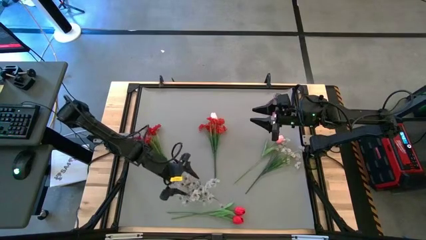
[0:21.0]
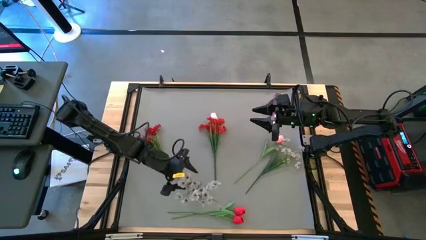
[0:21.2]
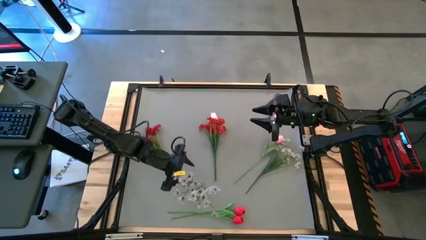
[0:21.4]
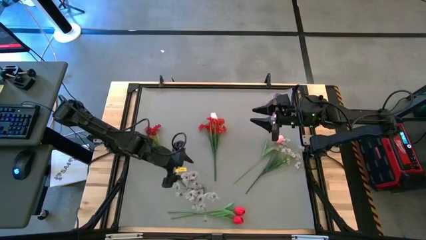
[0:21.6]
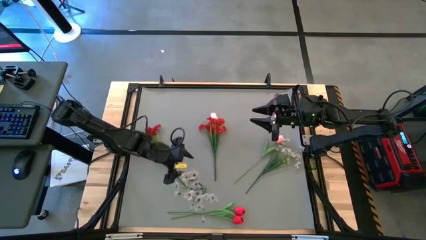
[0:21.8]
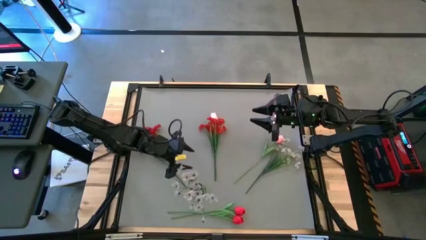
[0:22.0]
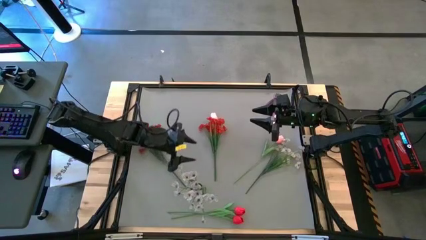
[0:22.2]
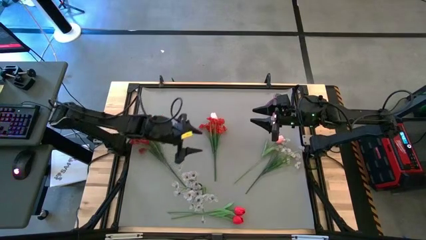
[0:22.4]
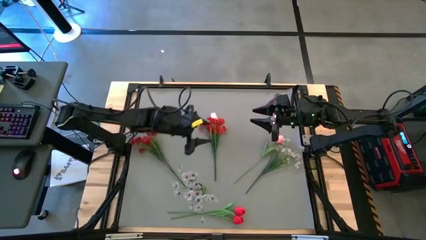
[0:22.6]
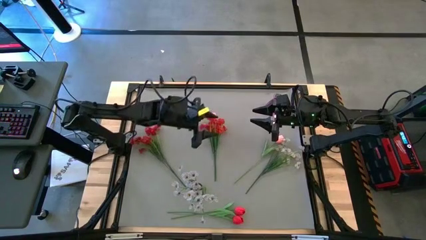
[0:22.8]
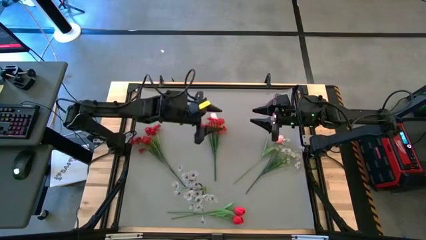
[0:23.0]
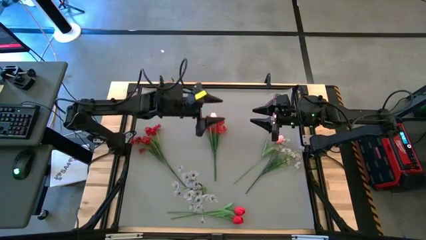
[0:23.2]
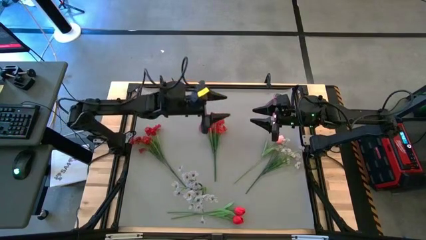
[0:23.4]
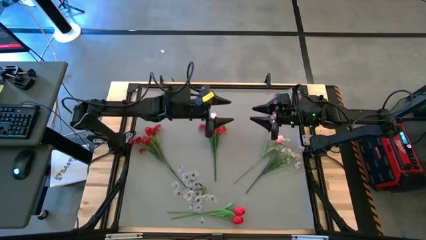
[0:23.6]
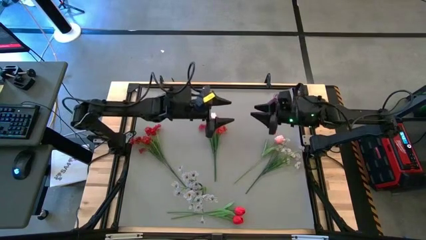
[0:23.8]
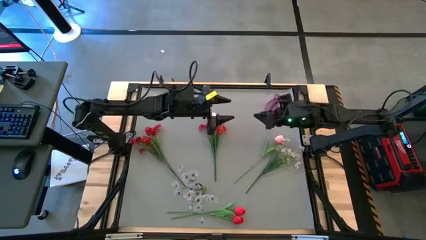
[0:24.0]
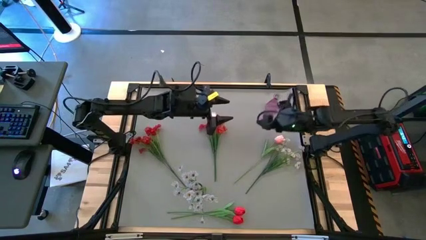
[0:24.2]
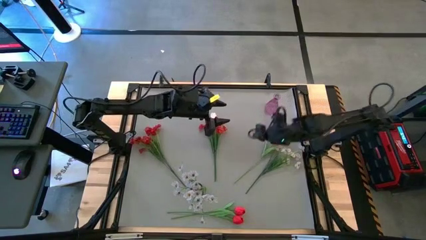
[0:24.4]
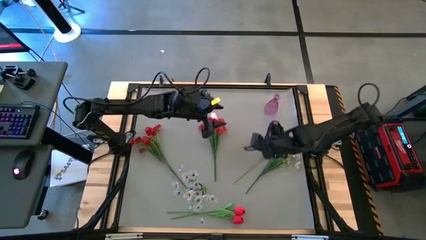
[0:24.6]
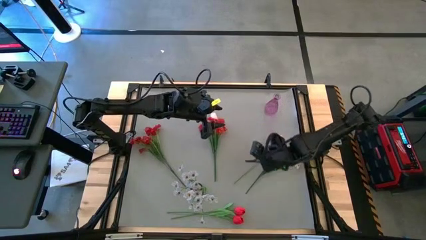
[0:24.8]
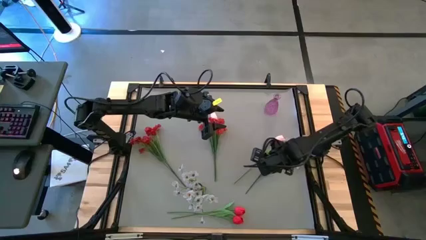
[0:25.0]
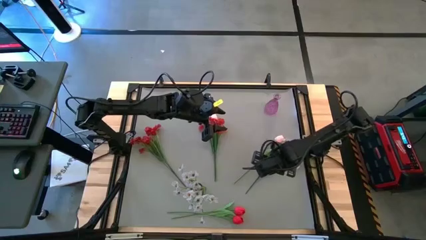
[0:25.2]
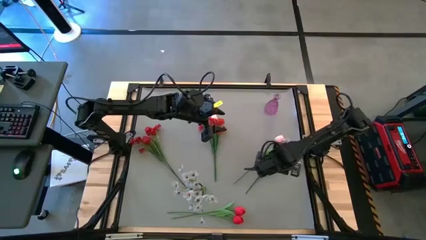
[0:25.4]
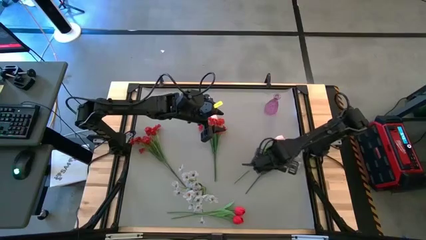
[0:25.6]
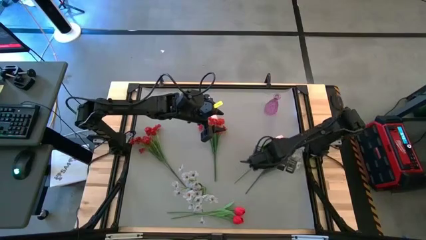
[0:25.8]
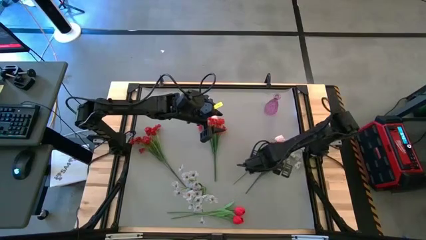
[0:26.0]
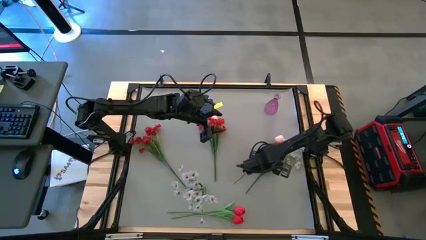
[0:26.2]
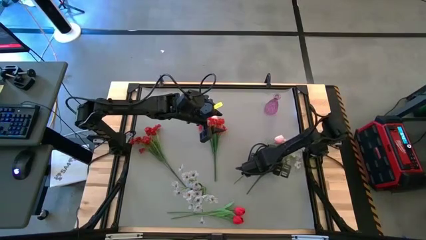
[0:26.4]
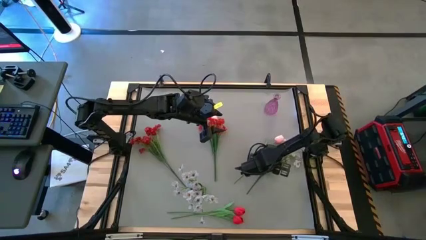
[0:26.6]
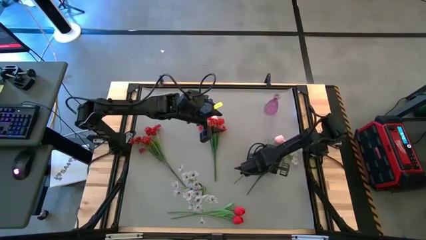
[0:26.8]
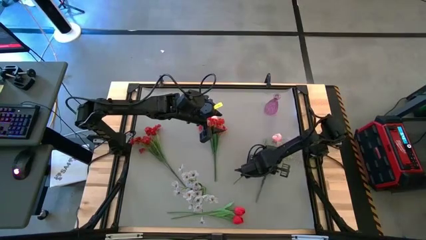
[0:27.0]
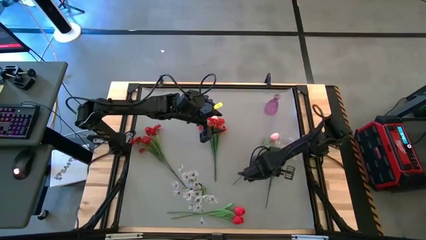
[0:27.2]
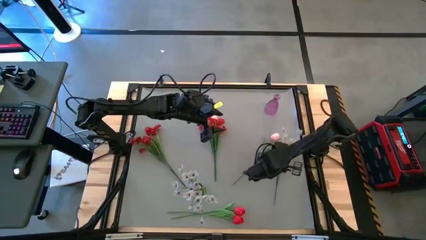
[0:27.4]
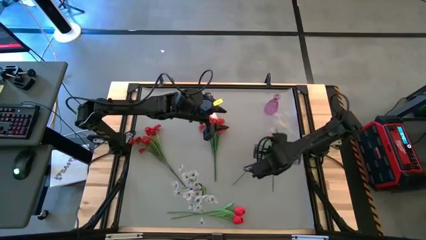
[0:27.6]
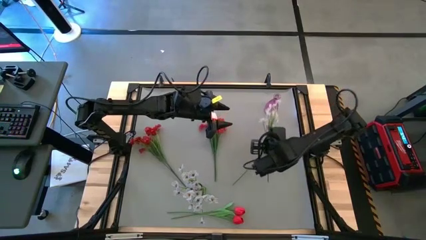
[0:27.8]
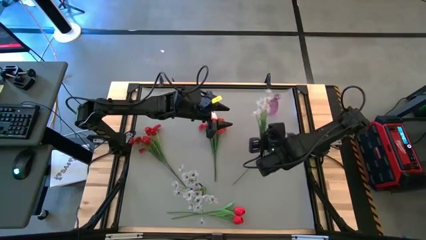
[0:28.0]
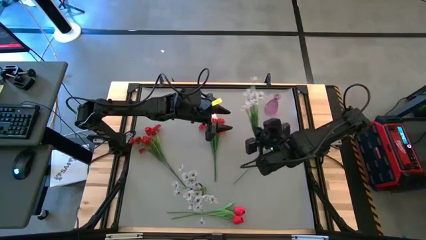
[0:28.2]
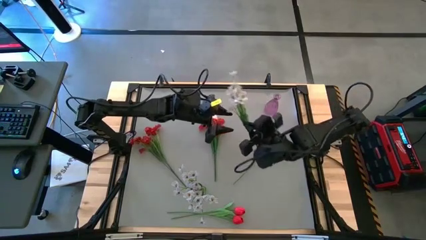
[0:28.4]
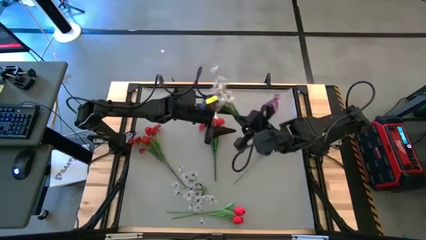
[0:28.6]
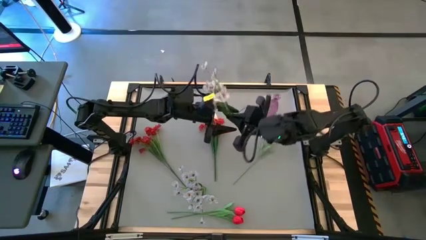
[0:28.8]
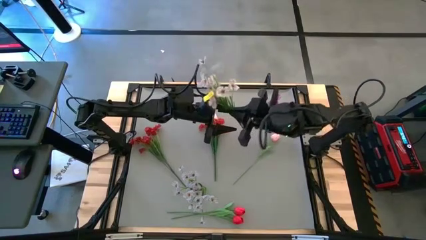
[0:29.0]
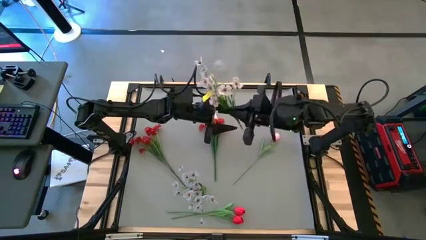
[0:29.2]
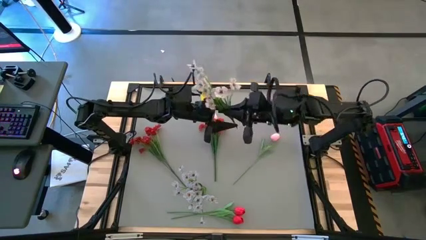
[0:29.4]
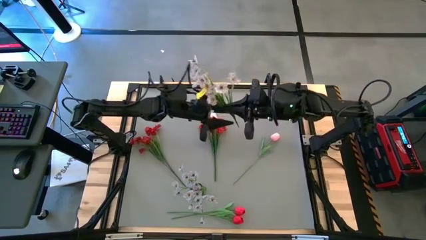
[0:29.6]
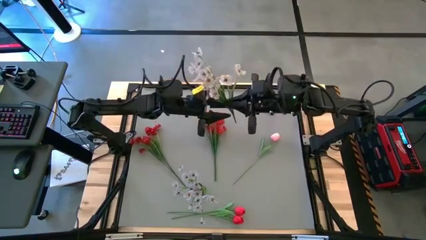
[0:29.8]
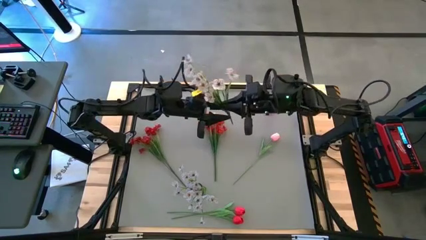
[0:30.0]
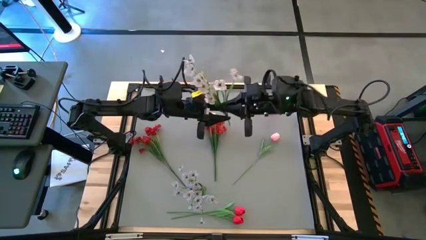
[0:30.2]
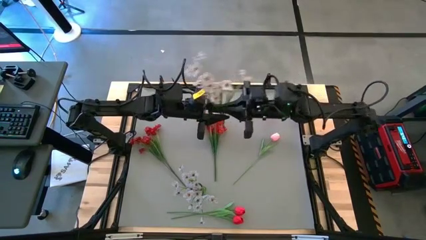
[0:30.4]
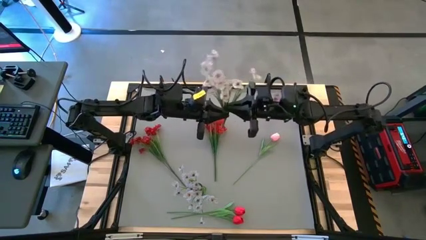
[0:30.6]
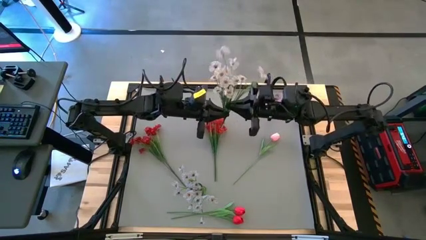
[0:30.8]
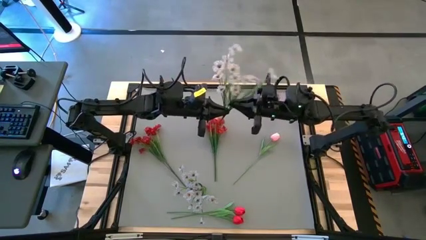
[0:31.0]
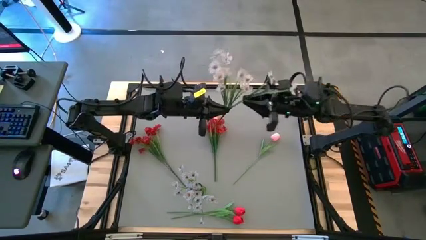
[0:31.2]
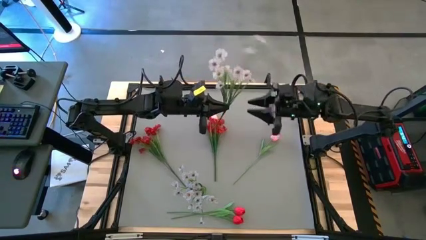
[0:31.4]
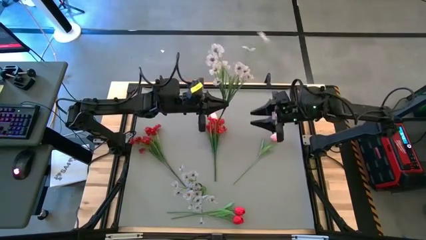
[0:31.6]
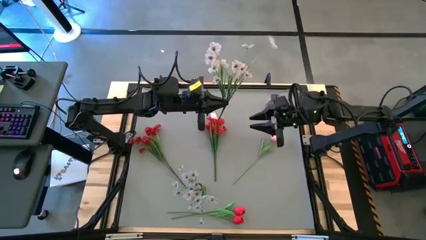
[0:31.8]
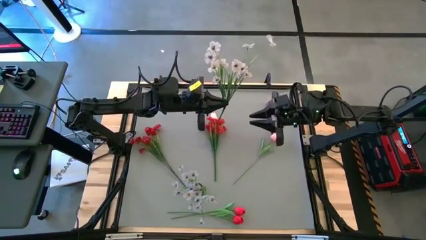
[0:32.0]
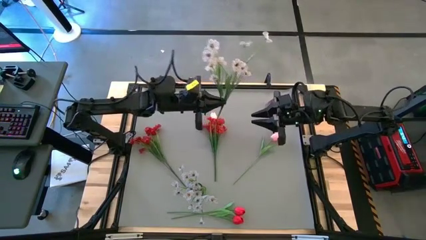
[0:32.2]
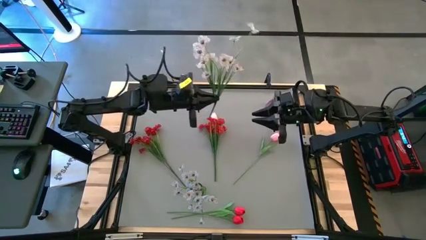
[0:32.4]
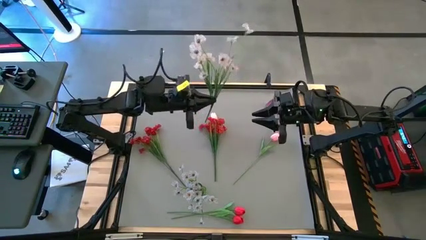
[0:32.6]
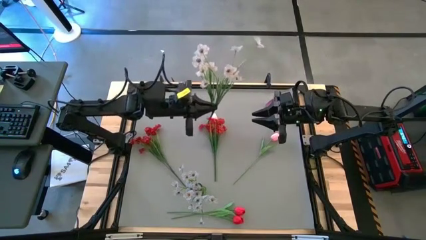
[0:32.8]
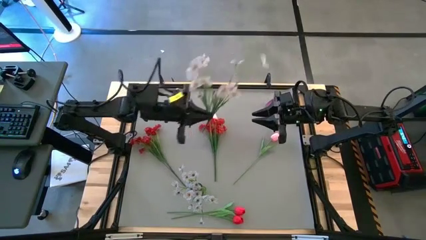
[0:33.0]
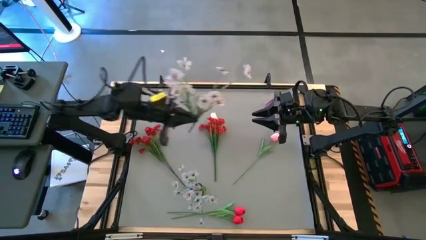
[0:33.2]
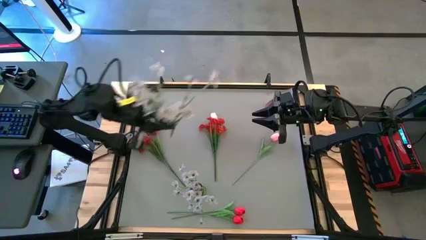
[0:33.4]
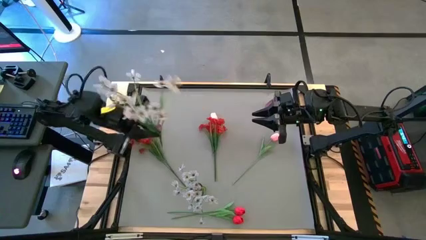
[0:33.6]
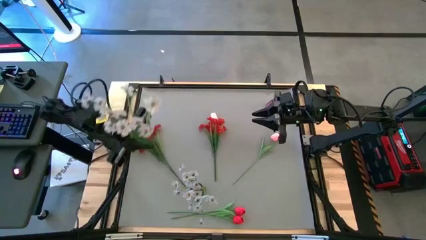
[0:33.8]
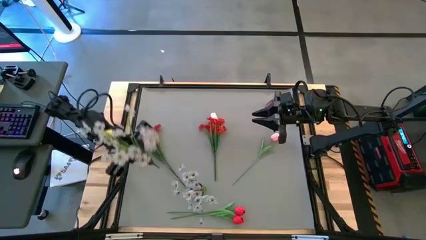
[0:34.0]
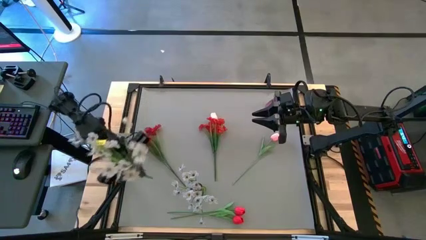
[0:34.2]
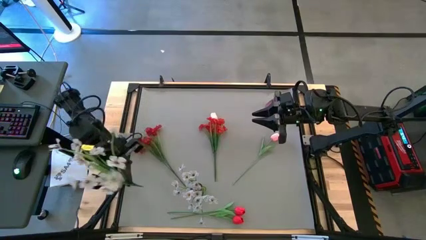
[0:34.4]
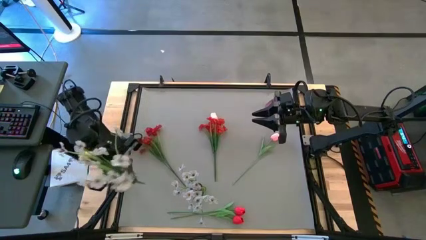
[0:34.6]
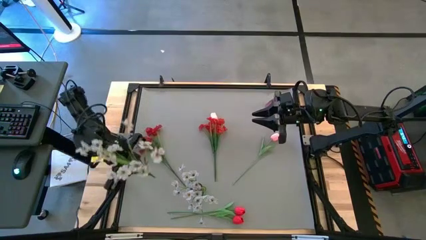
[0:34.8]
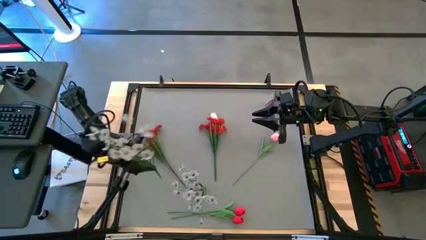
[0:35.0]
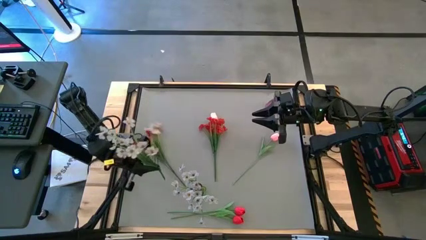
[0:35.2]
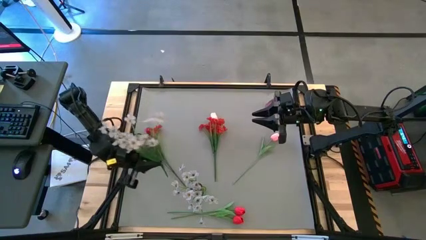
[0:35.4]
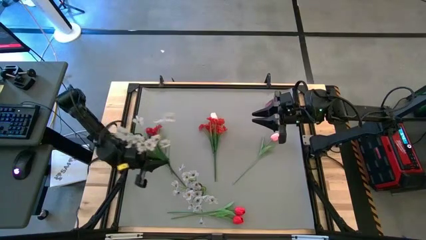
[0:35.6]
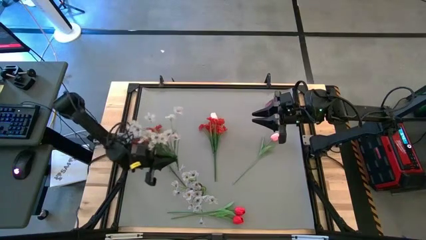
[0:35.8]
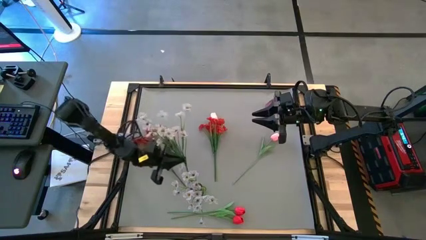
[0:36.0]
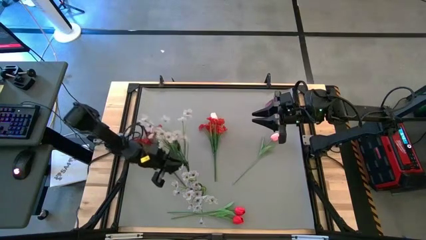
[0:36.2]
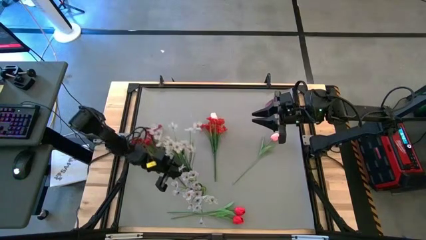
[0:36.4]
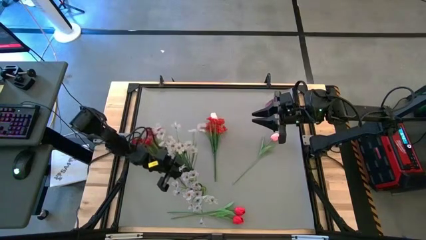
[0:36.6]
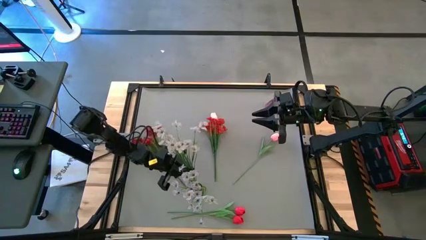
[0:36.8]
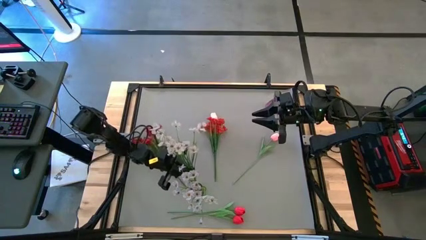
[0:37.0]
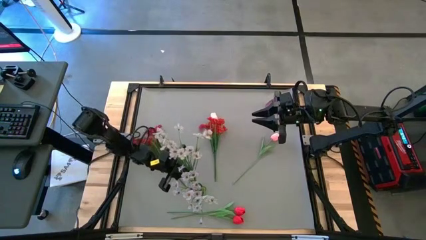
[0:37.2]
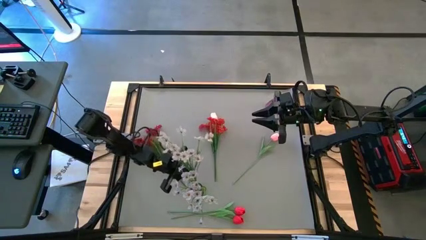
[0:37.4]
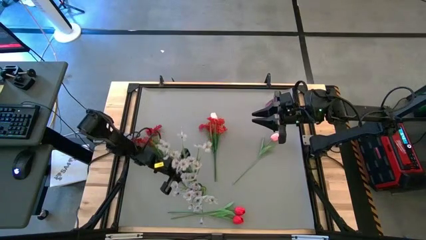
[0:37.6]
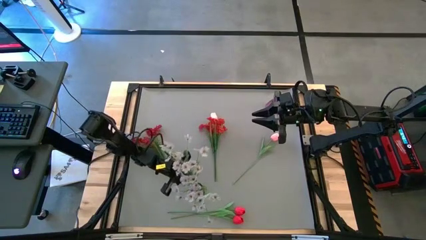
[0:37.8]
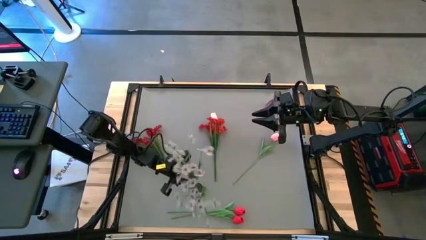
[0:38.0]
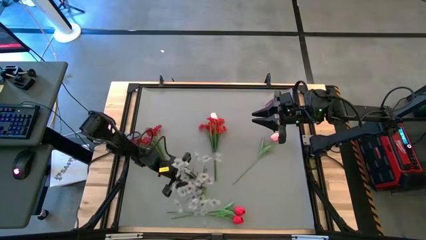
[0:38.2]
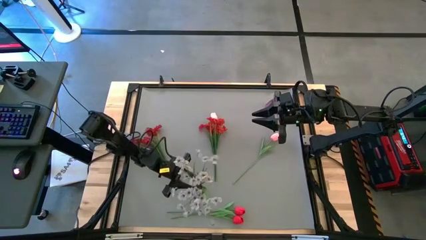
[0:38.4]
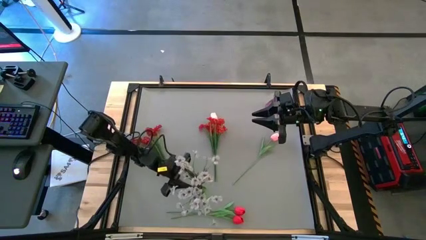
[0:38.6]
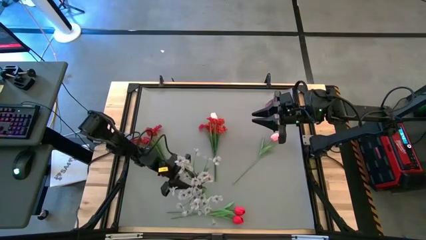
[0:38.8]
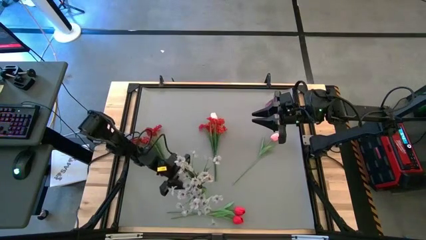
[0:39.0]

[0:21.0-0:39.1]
Task: Sort flowers into vase by color
Put the white flowers into the green vase
